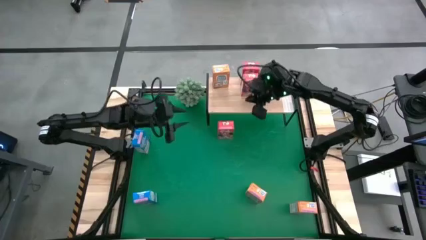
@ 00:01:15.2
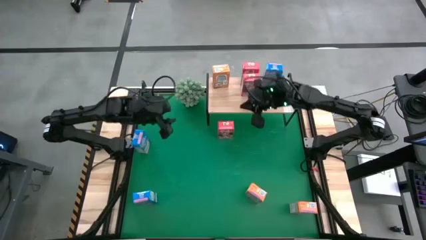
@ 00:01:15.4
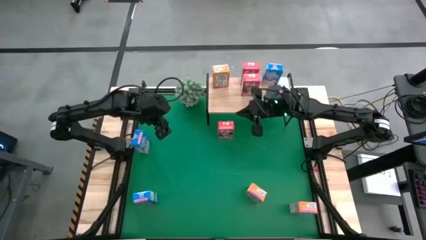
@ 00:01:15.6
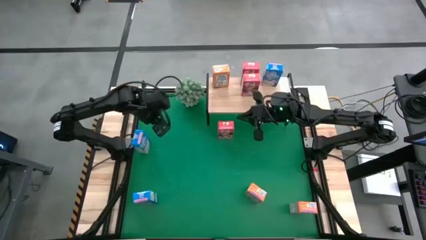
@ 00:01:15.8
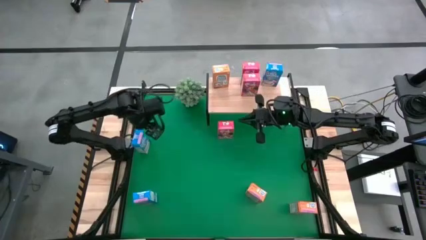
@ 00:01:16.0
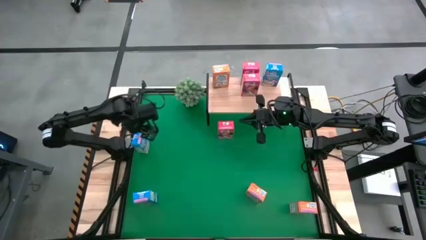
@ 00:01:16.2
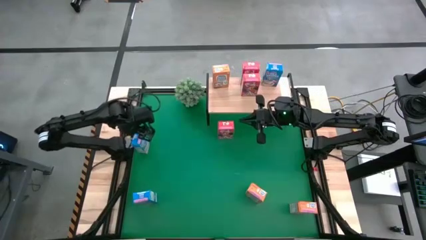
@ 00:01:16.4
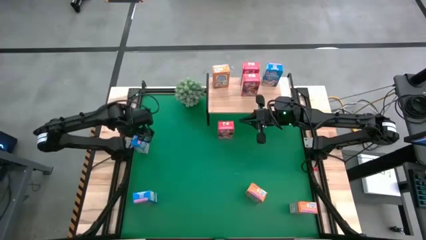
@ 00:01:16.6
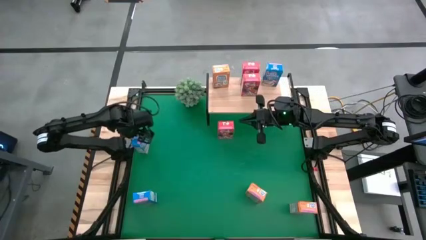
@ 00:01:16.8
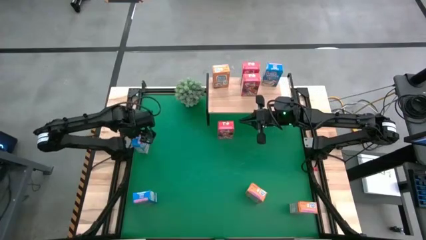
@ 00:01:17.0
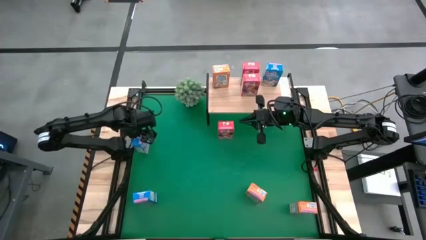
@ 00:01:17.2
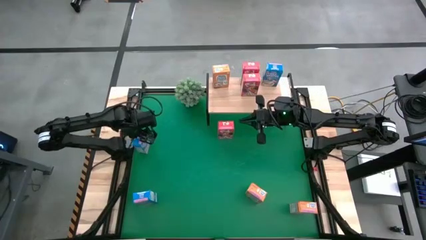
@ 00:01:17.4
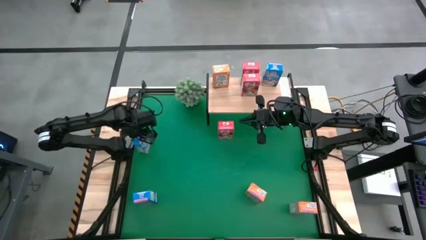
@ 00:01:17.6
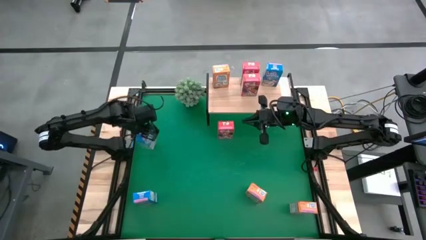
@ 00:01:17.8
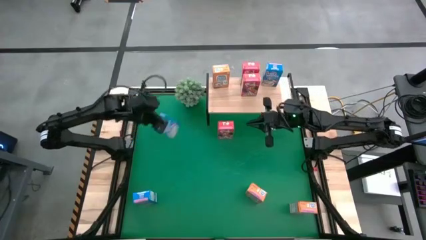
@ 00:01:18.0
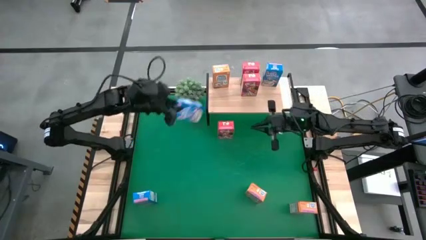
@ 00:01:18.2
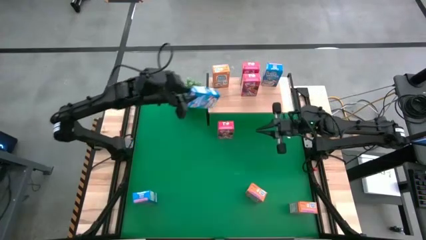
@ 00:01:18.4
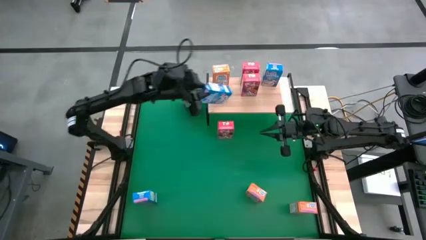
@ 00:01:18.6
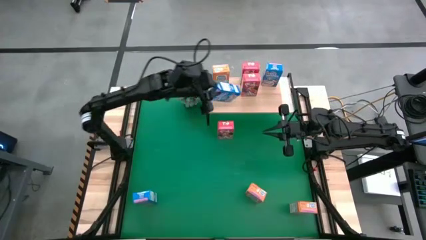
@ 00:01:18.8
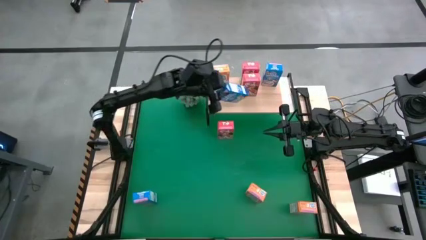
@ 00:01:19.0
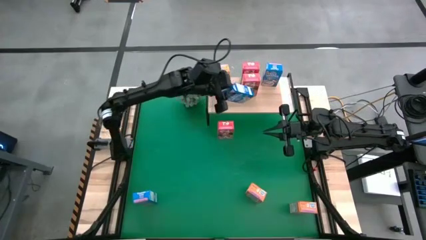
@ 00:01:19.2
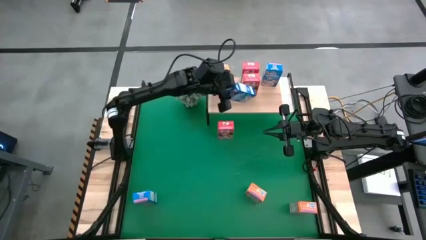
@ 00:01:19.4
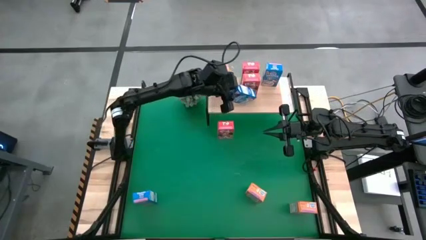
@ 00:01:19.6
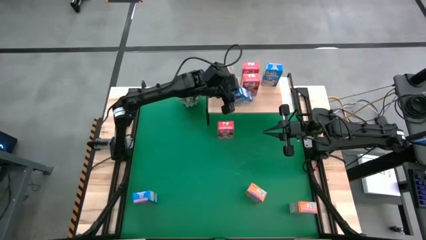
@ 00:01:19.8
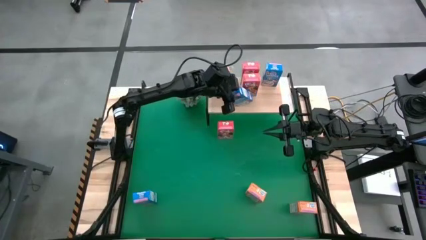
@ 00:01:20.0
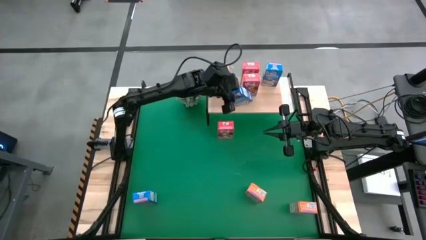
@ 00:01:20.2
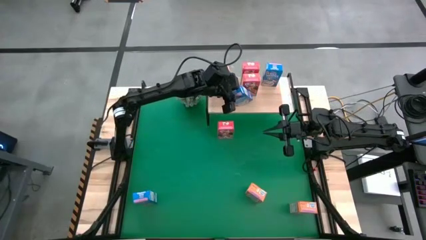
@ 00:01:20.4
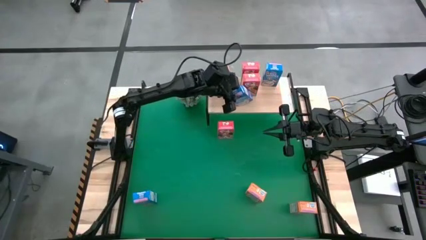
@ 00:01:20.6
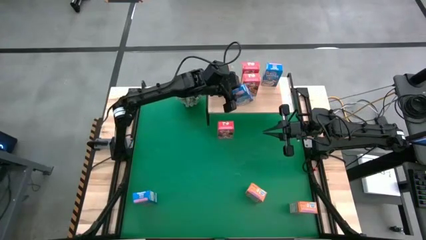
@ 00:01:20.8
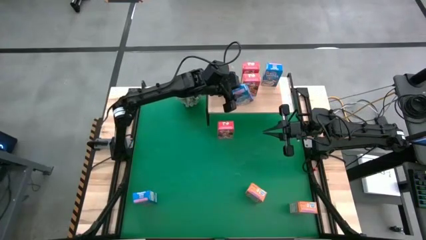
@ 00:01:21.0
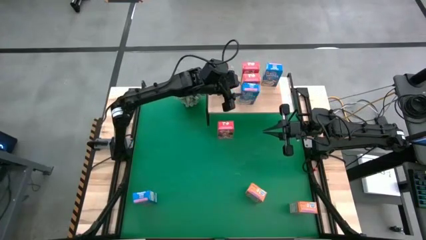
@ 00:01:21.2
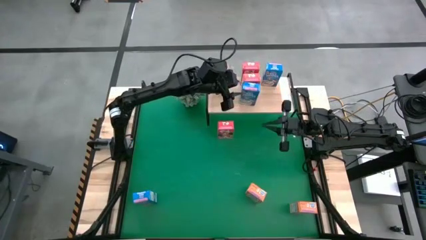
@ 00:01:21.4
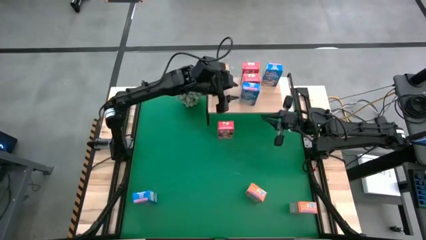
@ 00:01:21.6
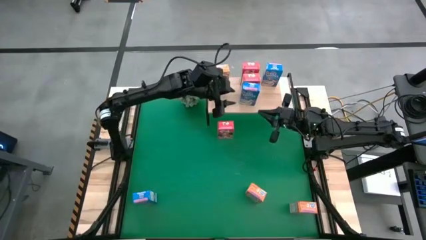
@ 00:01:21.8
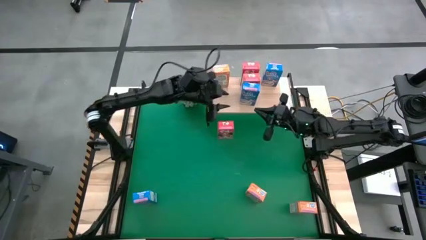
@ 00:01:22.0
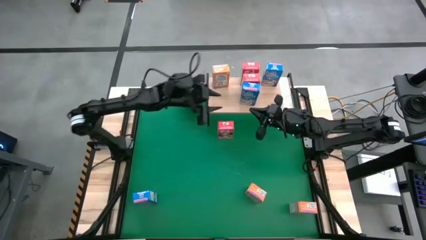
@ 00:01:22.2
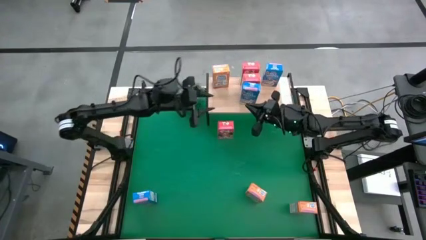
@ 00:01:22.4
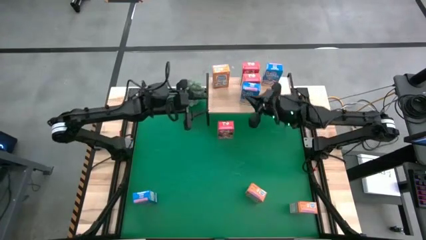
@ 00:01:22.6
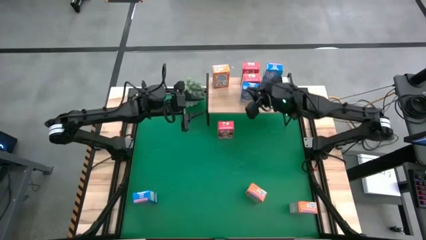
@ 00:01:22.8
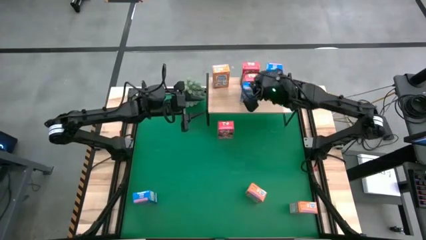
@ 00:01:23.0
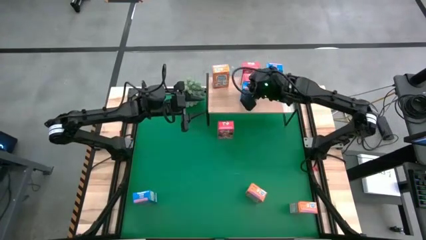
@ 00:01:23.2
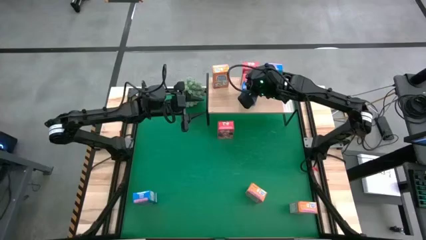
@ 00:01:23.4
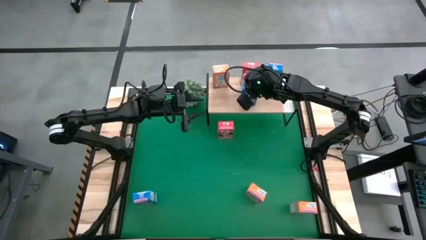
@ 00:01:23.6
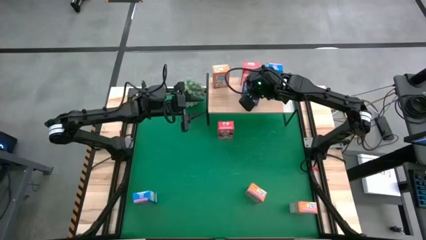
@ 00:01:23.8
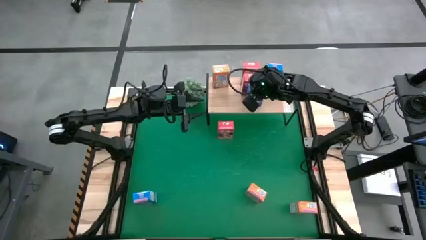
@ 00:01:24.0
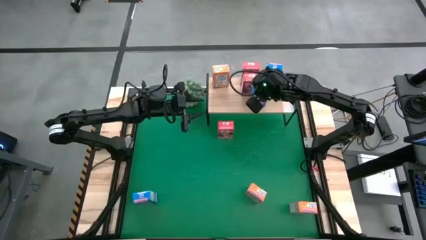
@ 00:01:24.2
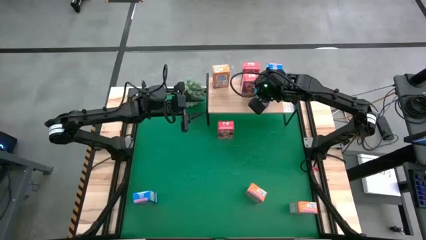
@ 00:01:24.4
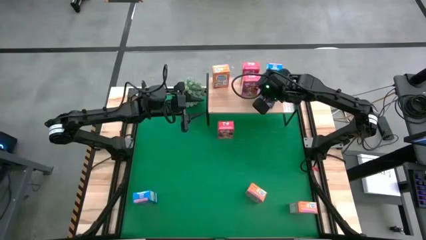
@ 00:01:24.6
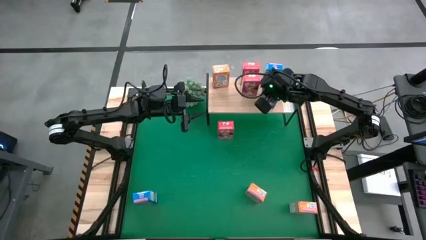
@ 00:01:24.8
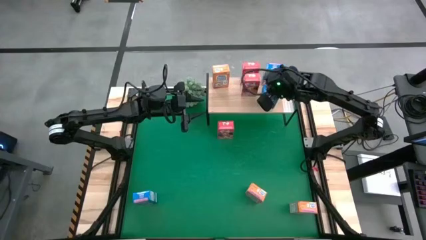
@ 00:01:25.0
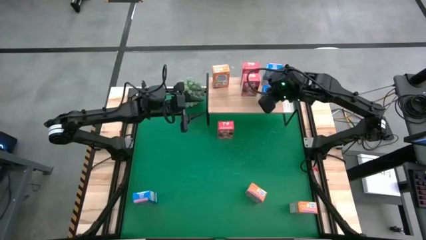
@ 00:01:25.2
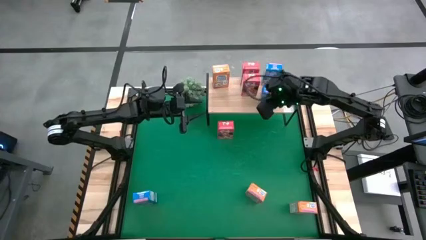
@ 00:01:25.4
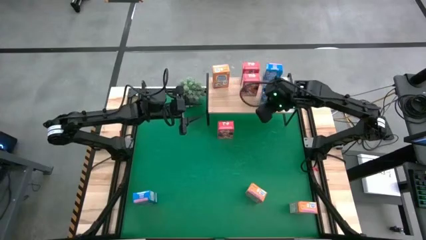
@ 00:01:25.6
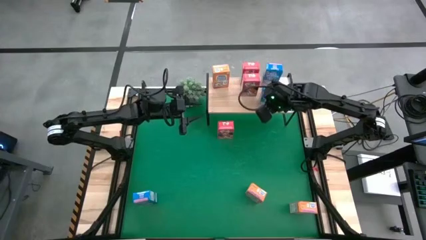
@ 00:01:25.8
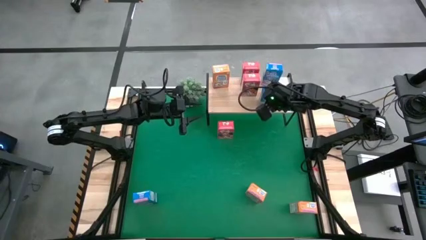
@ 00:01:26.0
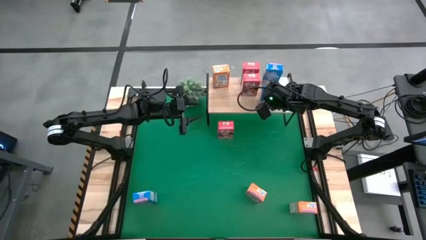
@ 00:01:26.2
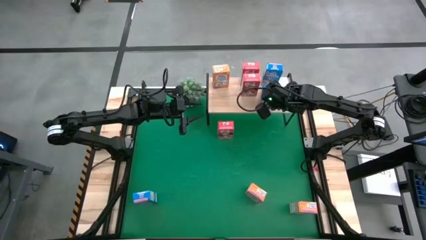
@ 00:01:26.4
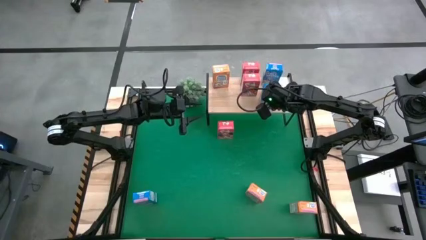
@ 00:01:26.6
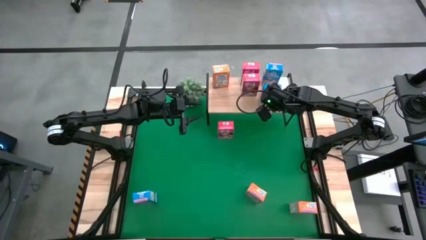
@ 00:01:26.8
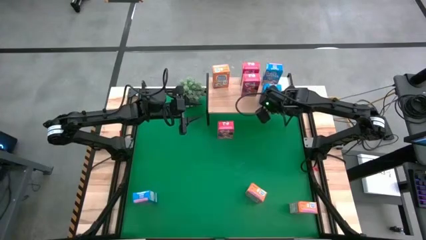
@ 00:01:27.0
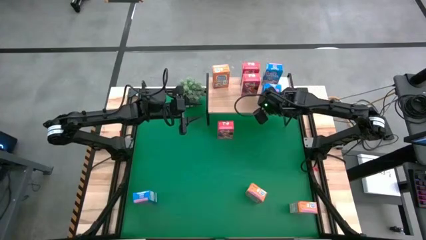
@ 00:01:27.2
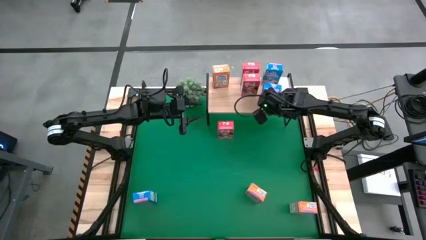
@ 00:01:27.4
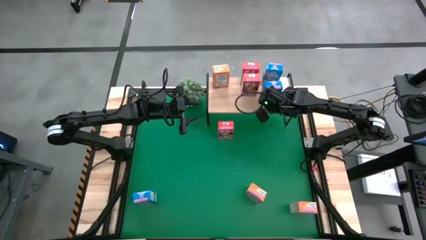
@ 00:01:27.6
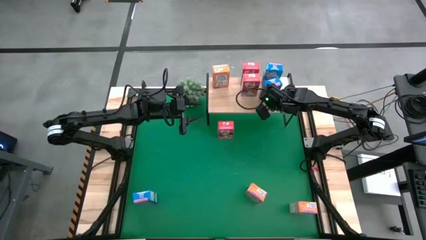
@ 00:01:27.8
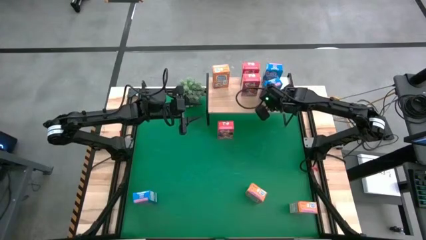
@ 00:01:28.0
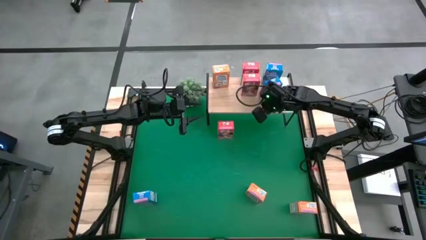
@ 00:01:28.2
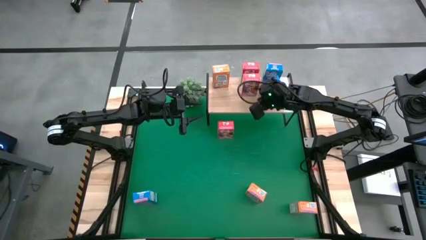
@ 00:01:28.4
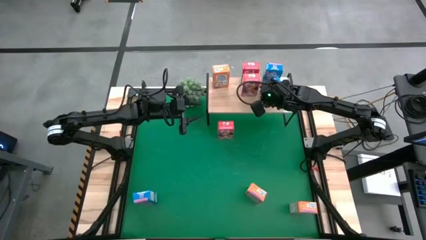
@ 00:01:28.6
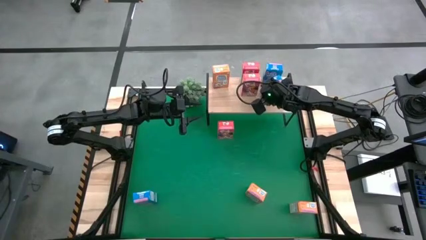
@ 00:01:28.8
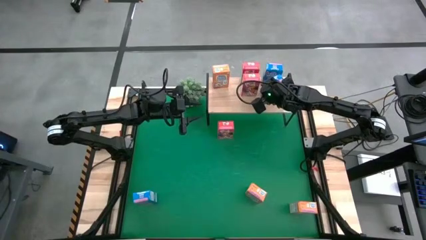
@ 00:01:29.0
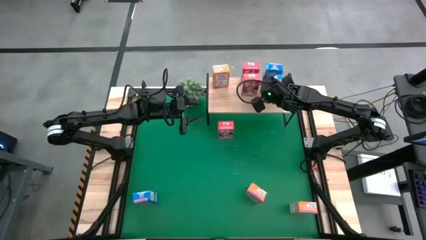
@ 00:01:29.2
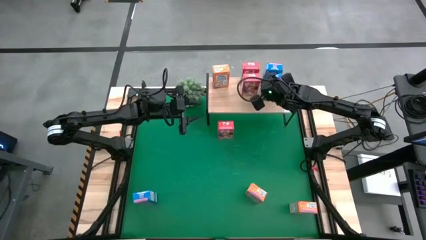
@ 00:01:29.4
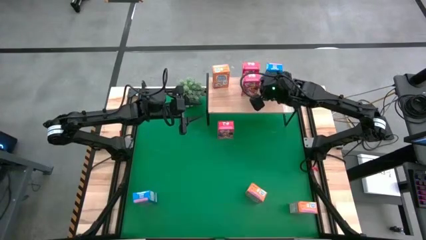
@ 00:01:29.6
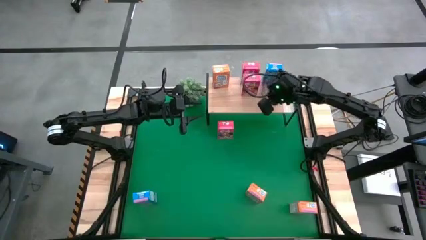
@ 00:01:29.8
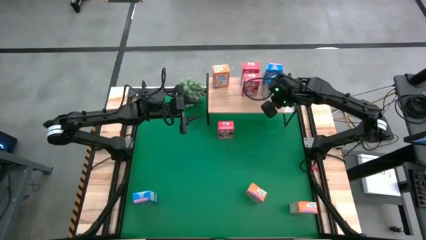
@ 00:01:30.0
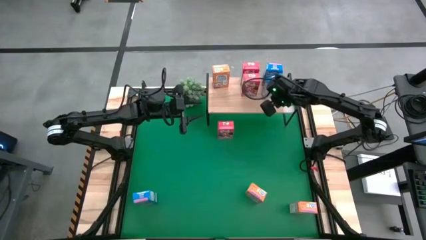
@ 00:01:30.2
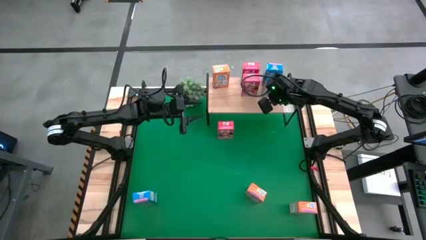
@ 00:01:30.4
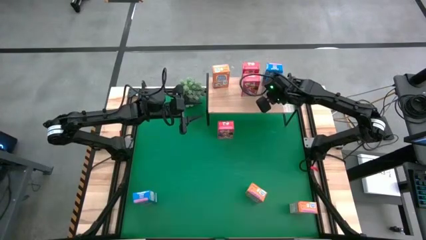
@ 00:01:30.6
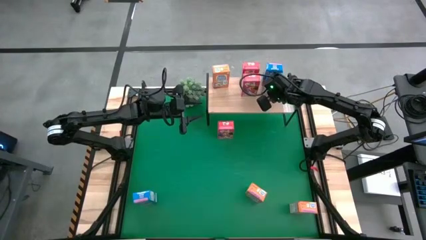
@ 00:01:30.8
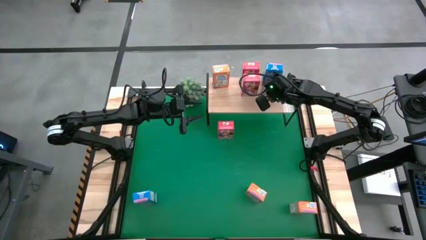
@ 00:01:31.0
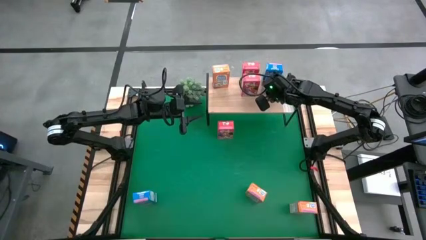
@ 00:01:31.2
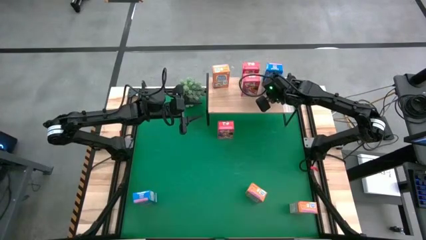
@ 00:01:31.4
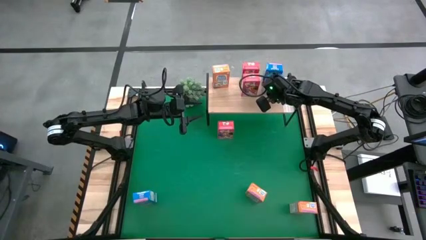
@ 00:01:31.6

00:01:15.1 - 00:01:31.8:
Task: Stack cereal on shelf
Put the top blue cereal box on the shelf aligned with the other blue cereal box
